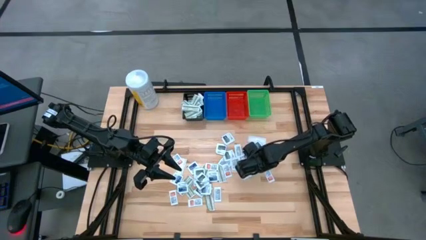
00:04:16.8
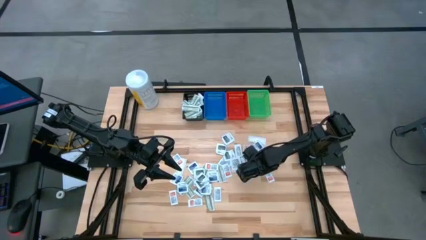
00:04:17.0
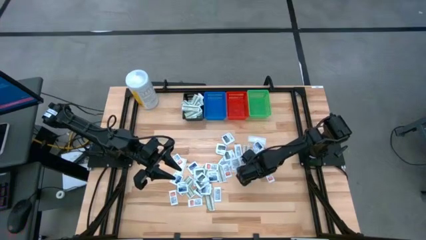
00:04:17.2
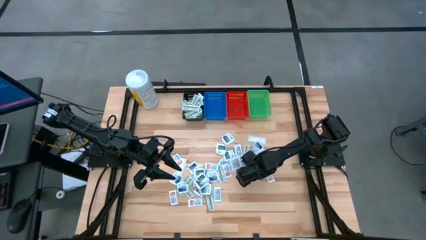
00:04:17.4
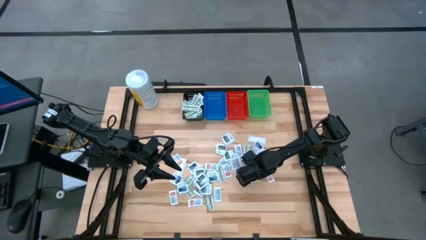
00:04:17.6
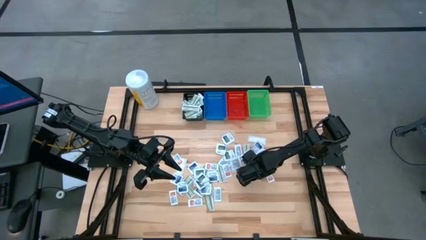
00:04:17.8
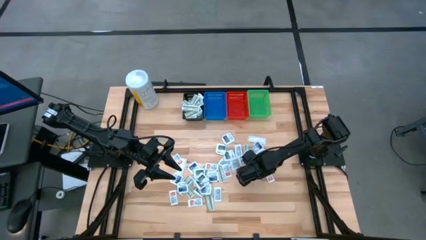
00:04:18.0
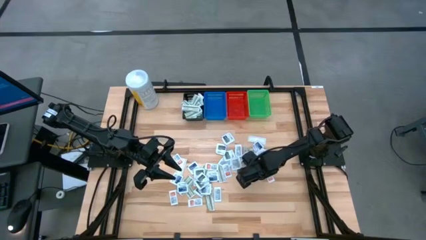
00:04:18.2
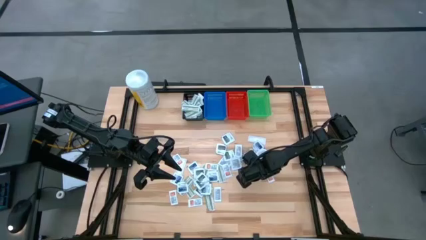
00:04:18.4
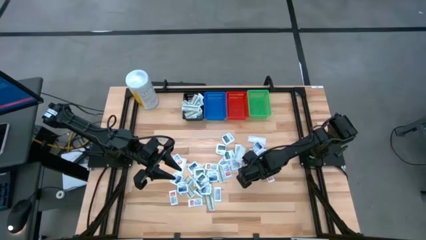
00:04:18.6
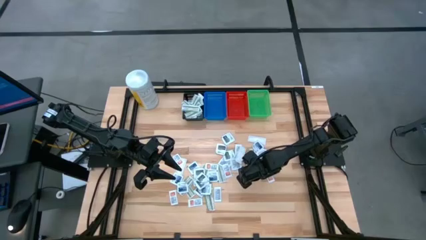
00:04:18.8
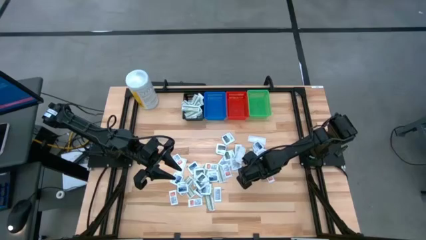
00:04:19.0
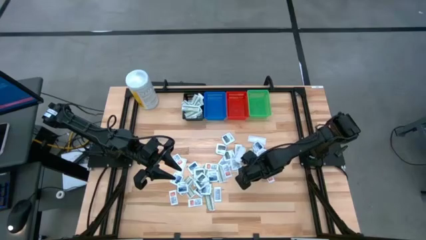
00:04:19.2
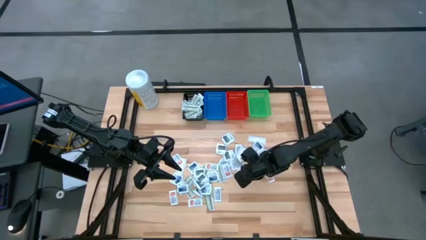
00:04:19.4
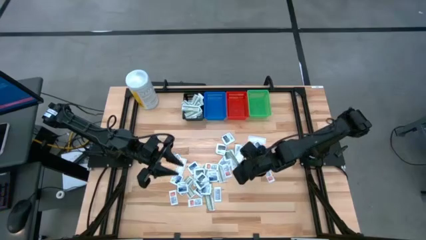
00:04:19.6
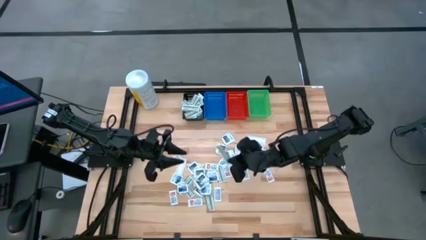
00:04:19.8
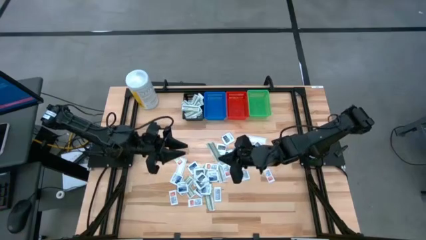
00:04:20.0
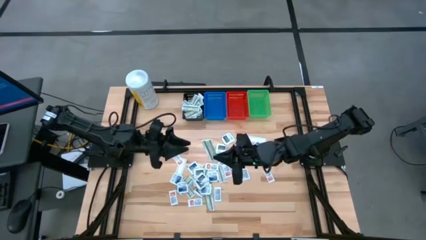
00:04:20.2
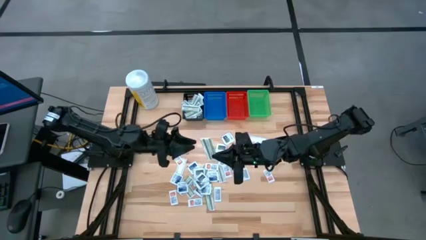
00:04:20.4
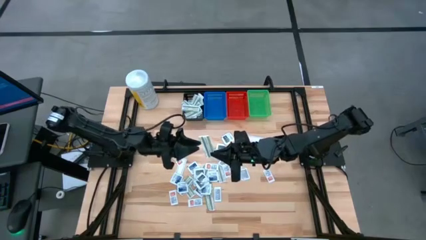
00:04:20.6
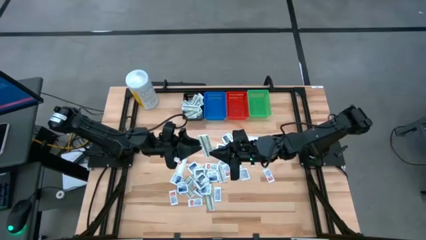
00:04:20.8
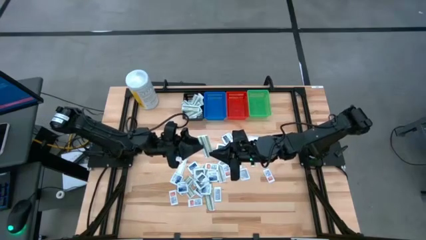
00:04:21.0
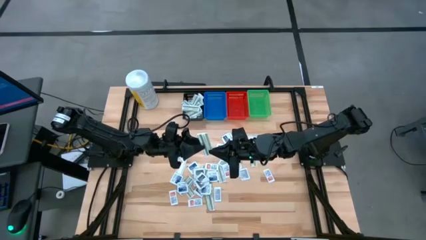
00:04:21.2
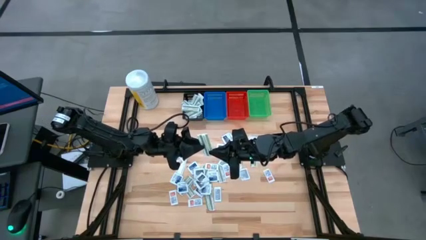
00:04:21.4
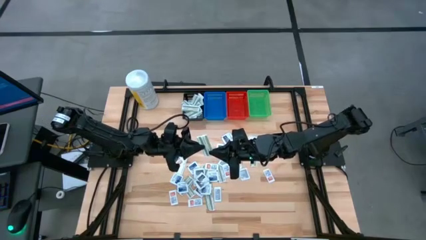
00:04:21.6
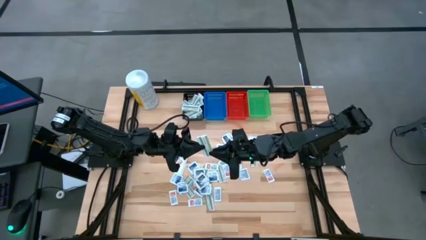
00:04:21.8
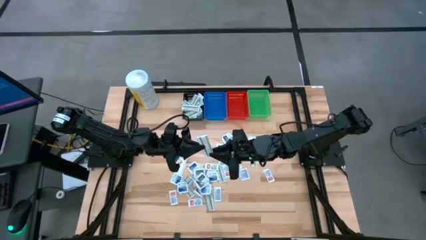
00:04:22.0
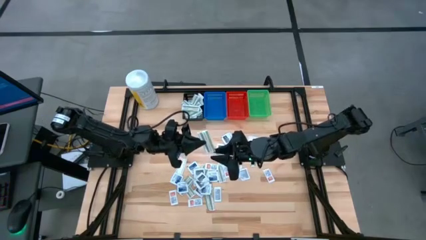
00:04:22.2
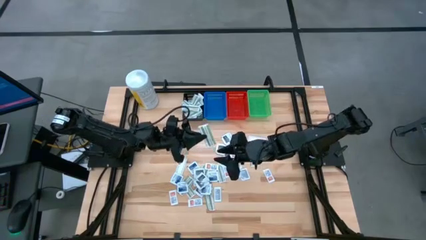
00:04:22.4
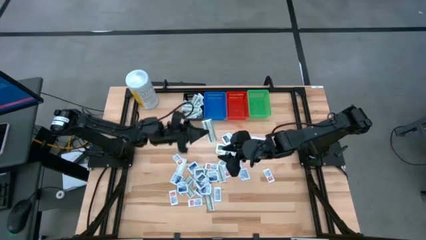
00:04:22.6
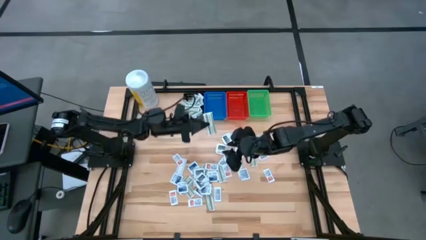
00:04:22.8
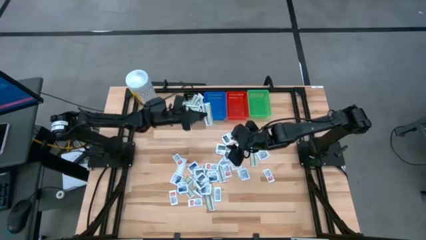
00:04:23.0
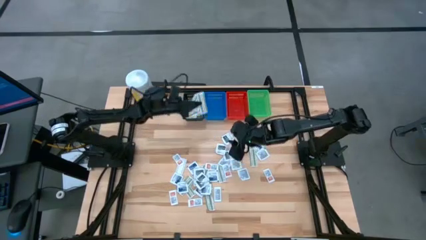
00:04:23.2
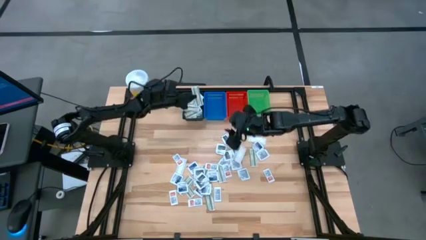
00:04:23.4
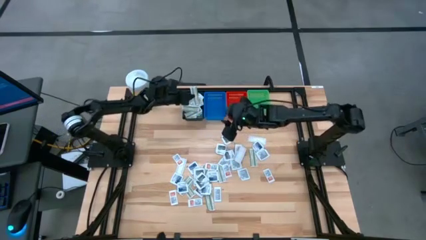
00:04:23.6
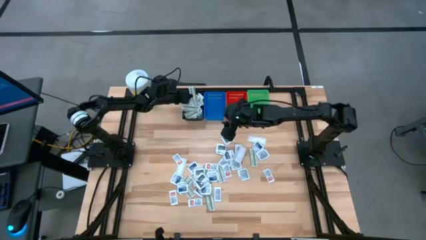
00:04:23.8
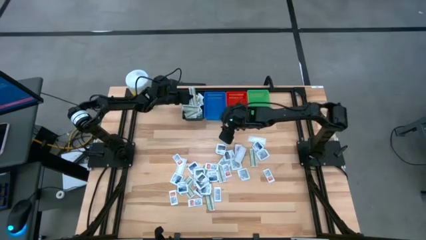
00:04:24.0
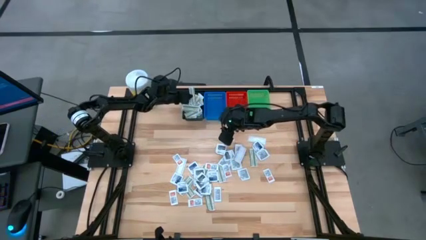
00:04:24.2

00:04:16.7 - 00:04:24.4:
Task: Pick & Place First Aid Supplies
Put the green bandage pack in the black bin

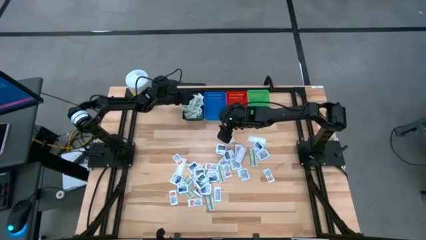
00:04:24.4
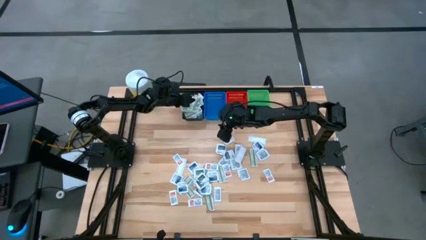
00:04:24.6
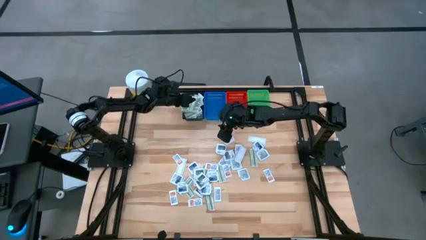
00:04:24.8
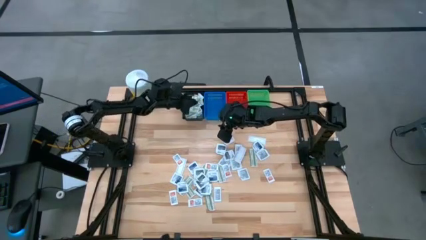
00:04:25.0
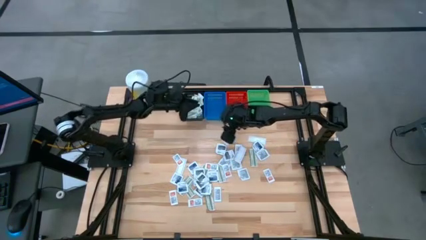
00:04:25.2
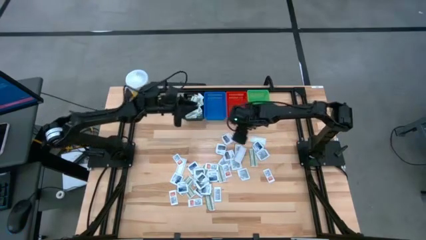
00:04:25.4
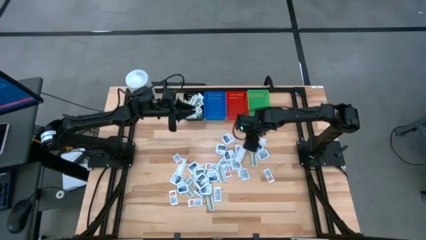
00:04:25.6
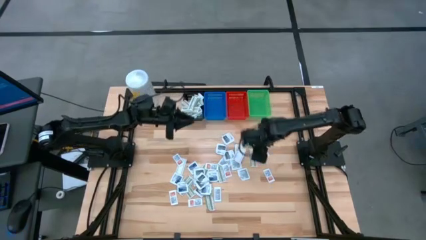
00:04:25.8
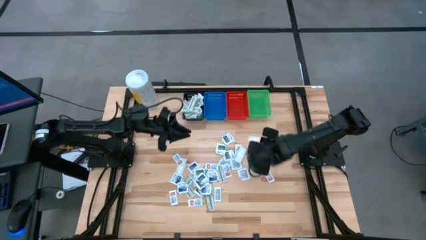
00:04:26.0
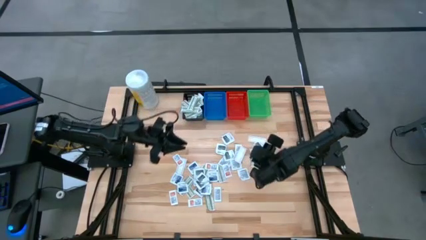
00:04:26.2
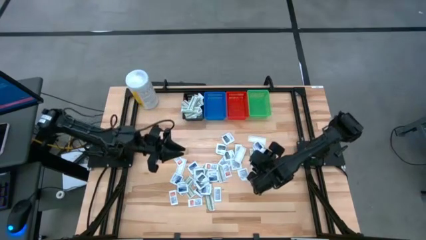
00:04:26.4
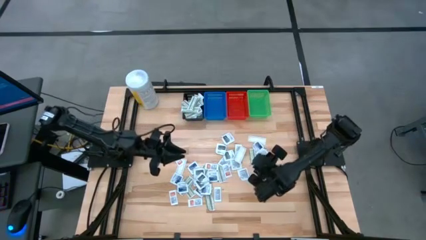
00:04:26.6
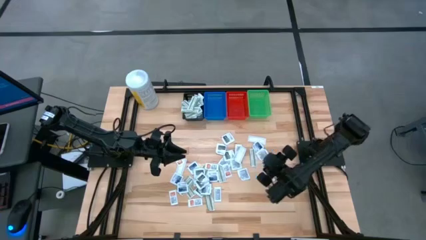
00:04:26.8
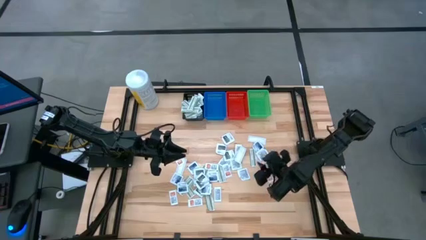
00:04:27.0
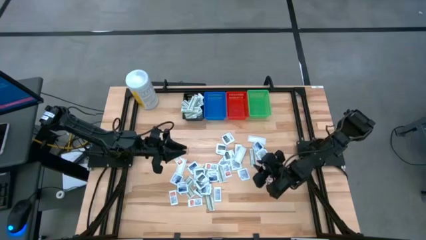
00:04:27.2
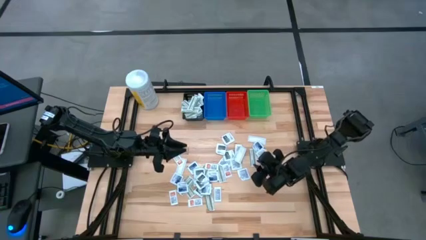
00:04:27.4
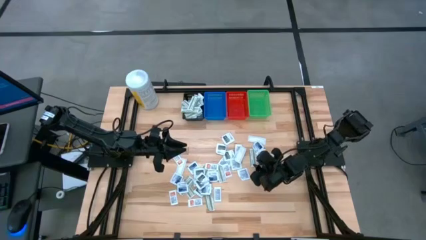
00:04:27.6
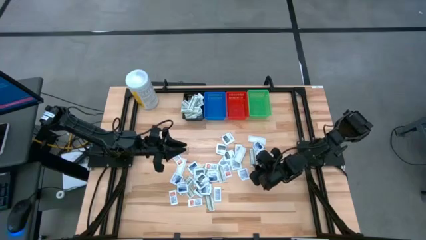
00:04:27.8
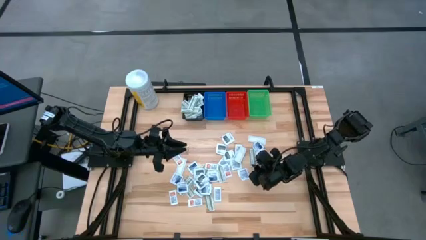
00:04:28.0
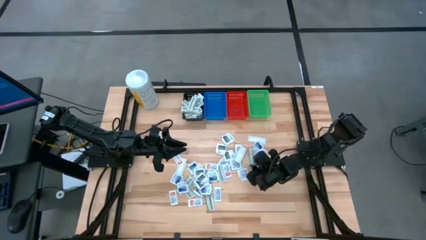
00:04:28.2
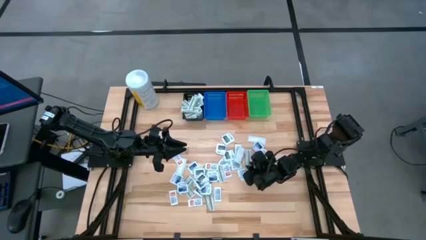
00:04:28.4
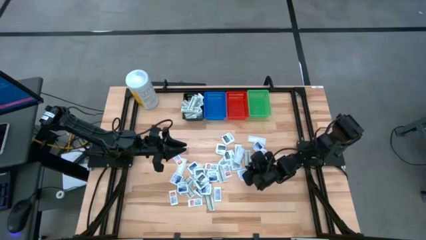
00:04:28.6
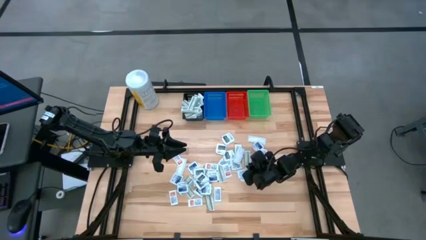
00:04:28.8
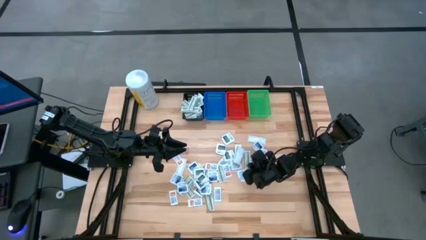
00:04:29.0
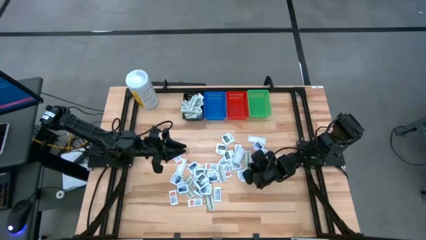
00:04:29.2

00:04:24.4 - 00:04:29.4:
Put the green bandage pack in the black bin
